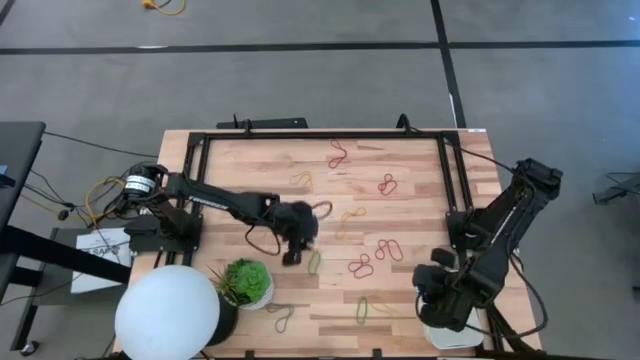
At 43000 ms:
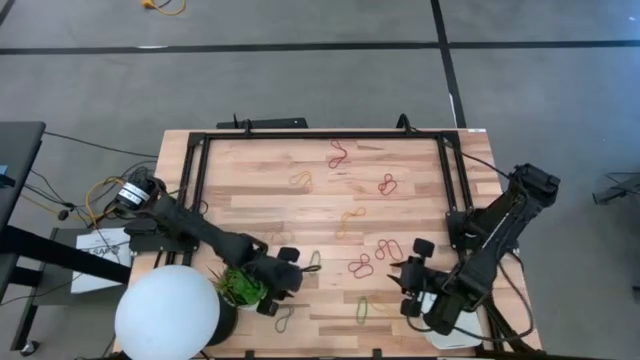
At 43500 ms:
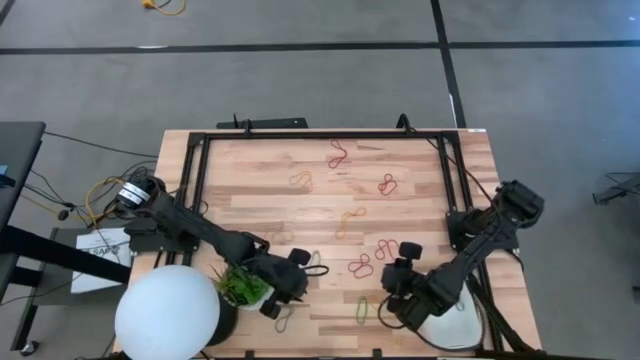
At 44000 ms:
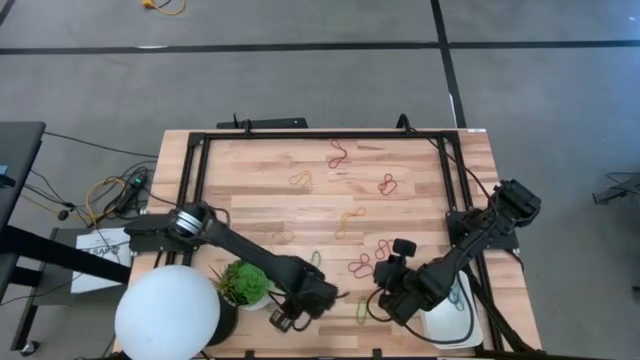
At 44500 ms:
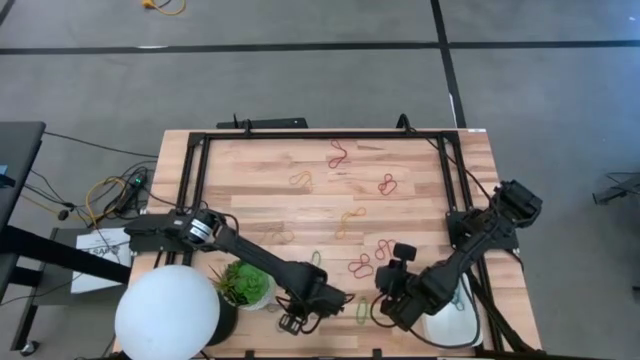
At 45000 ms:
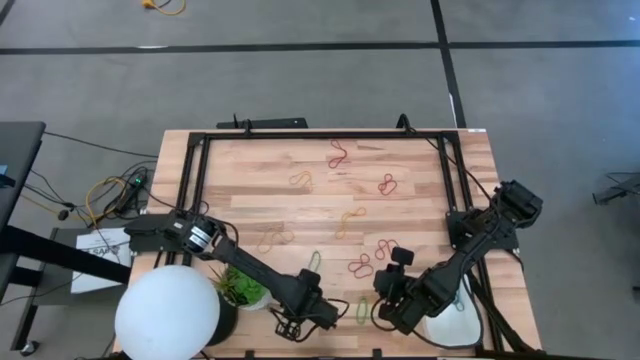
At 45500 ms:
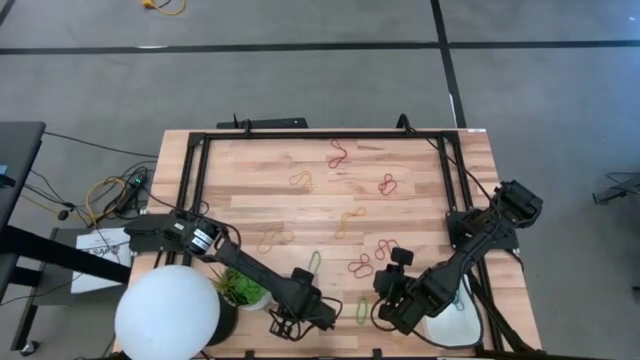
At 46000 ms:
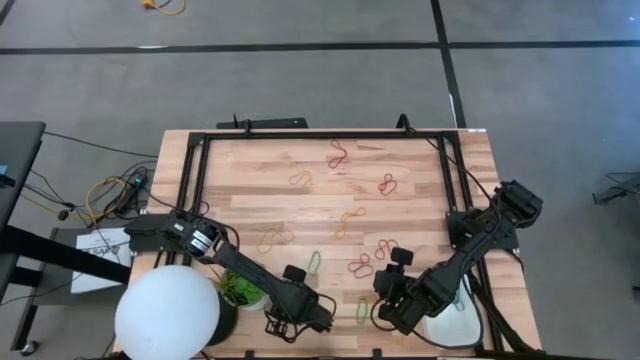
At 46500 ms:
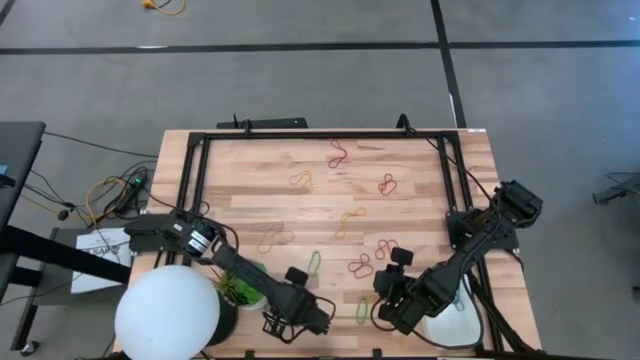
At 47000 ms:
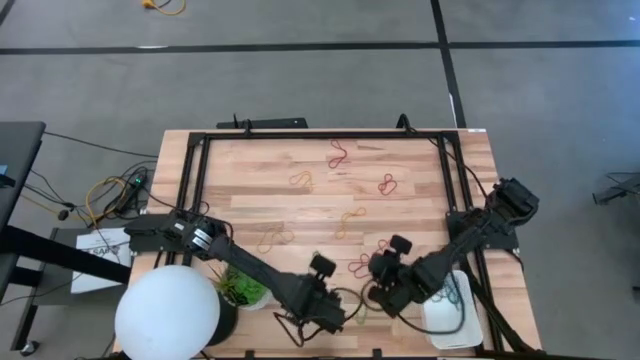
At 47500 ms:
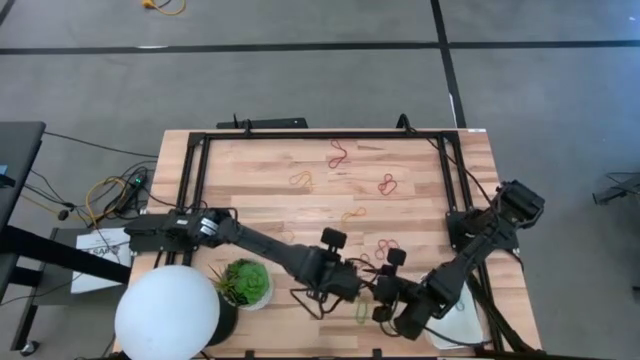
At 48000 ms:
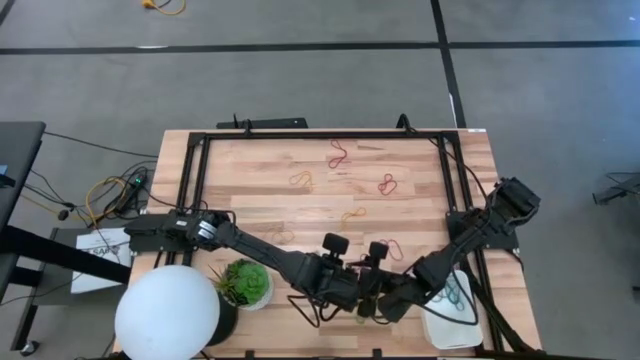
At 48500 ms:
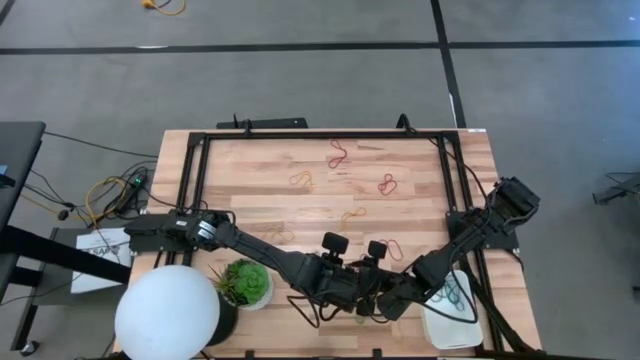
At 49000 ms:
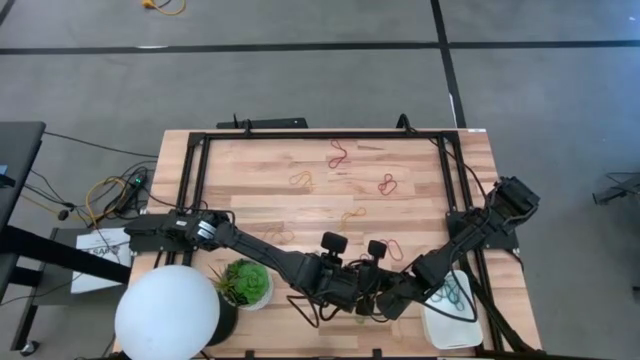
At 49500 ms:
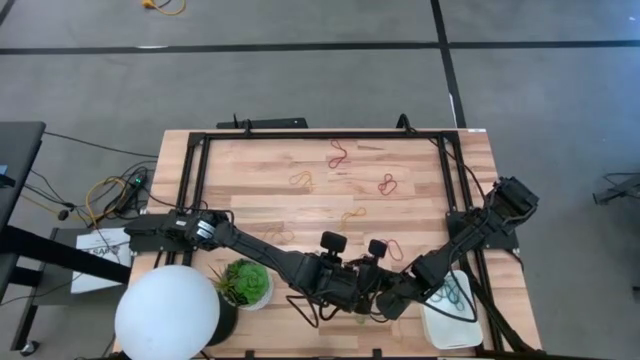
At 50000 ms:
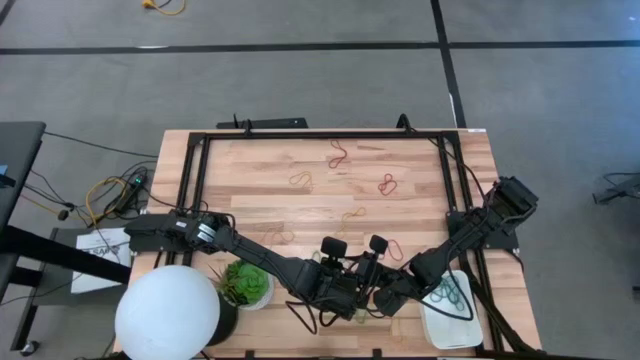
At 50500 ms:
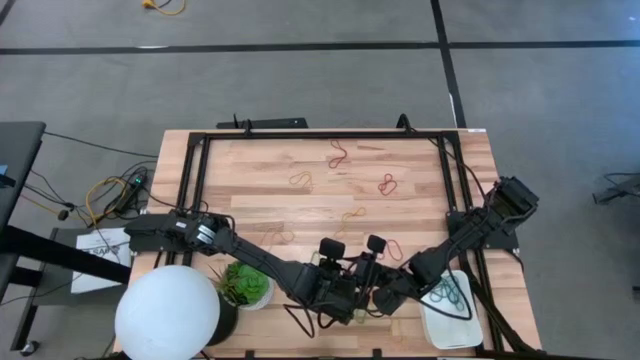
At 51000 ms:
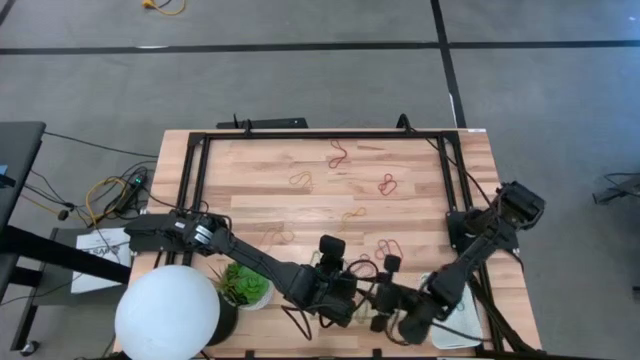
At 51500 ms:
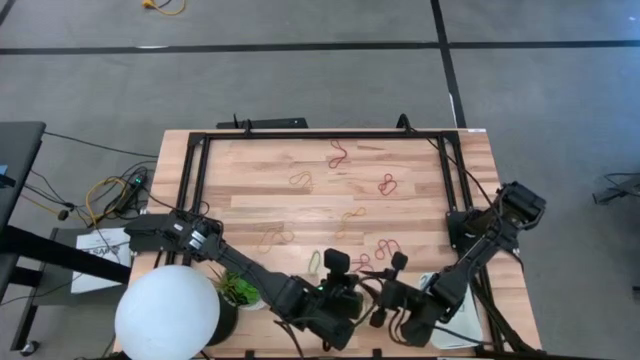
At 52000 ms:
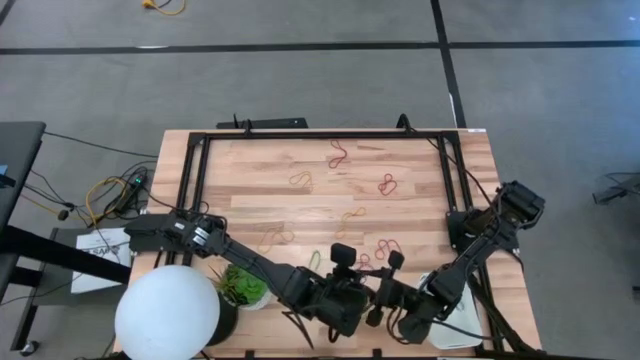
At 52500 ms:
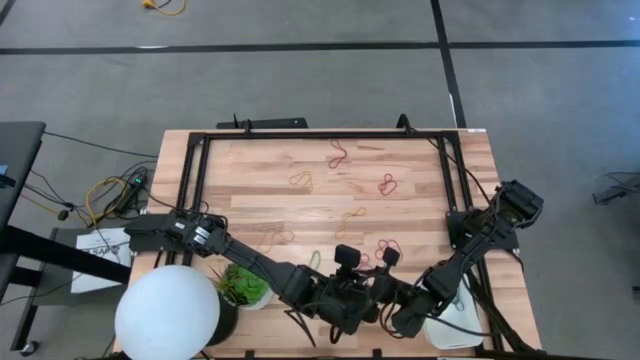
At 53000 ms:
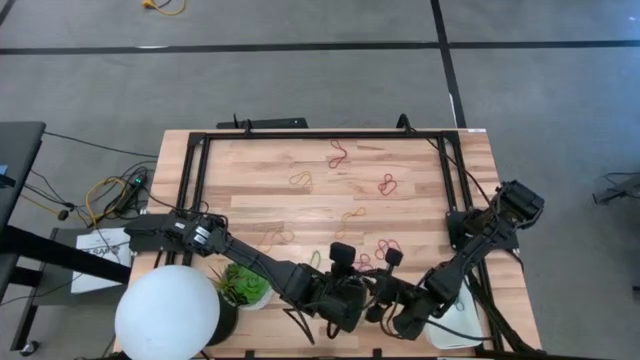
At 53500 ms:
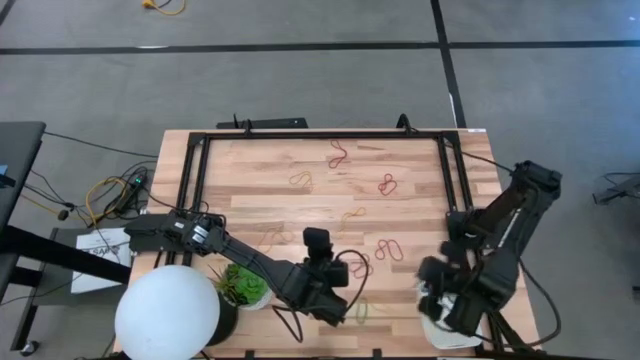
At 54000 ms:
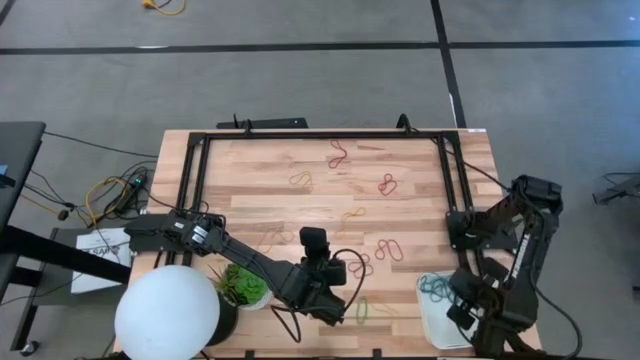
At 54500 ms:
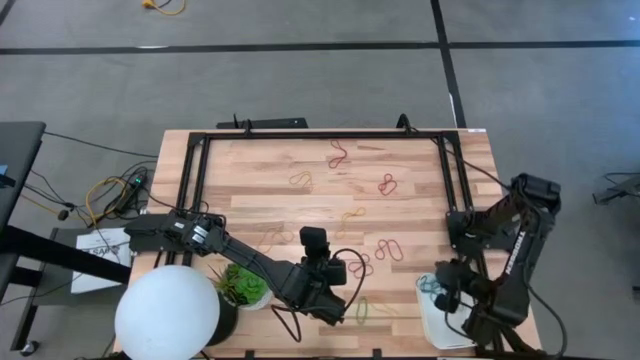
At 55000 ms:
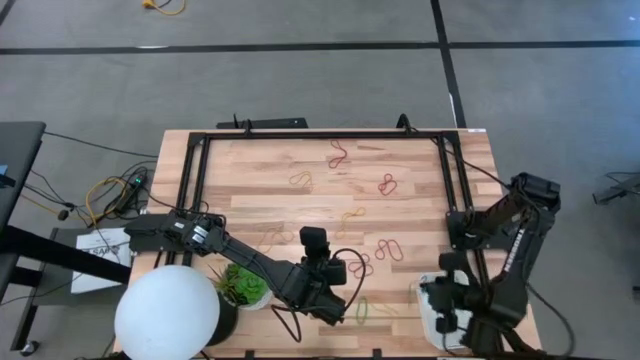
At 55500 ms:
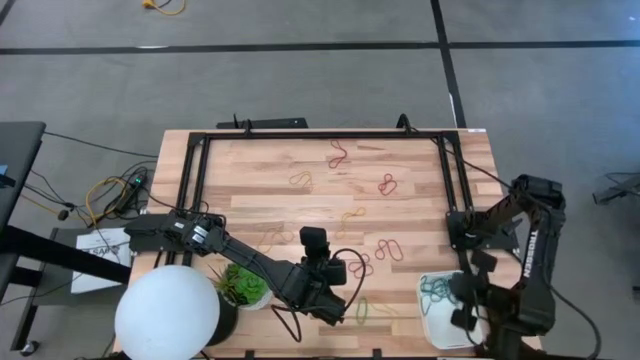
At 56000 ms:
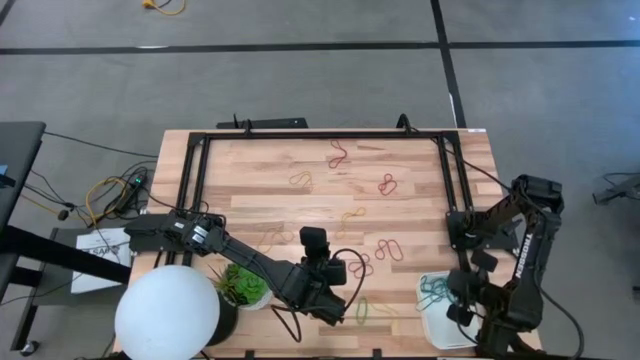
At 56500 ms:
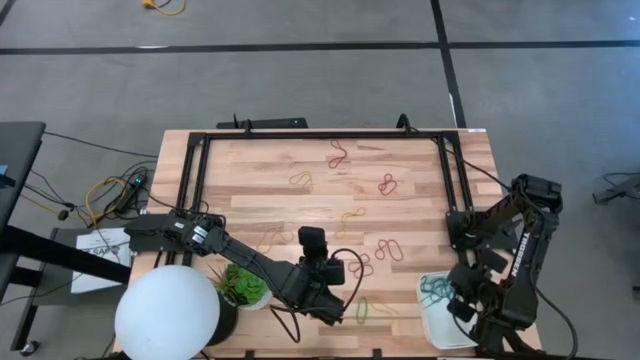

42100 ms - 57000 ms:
Task: Pick and place items into bin
Put the blue rubber band into the white bin

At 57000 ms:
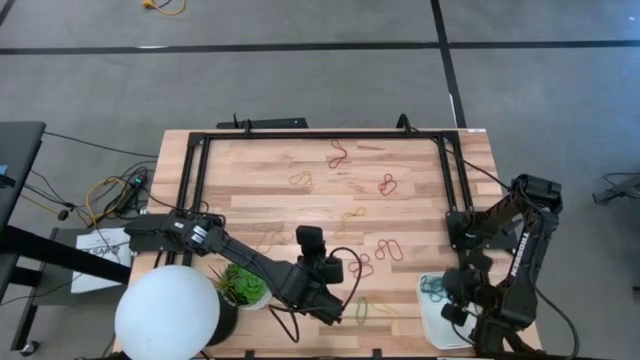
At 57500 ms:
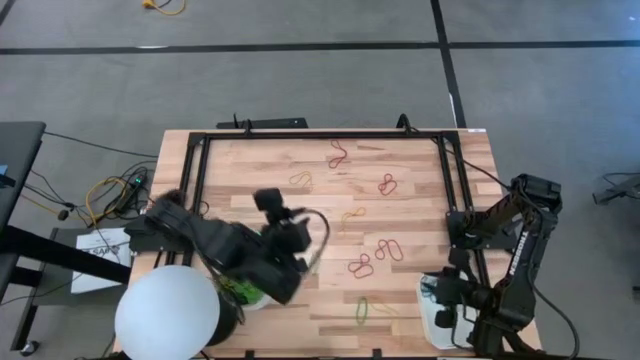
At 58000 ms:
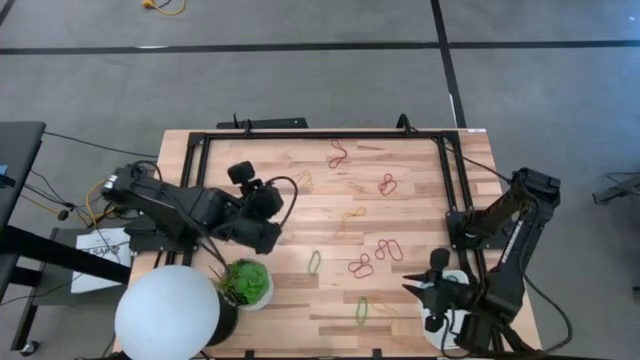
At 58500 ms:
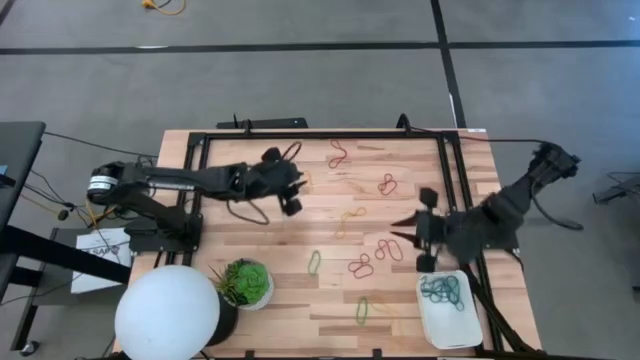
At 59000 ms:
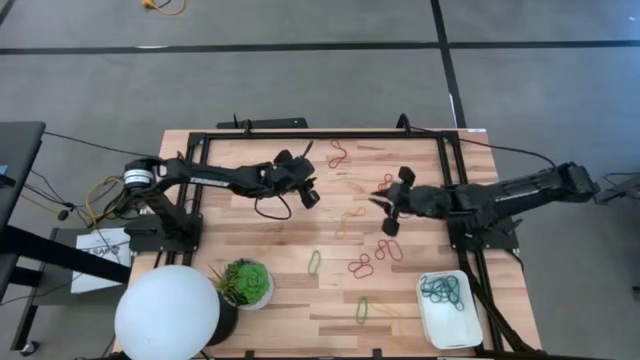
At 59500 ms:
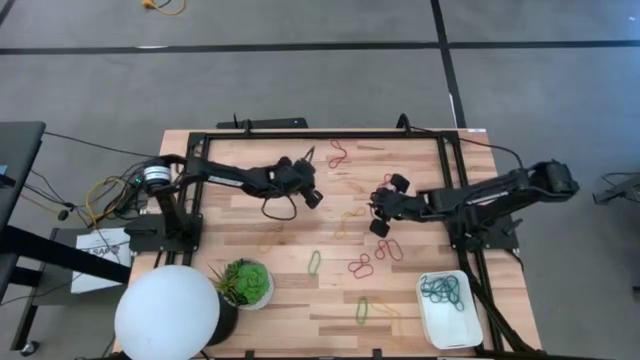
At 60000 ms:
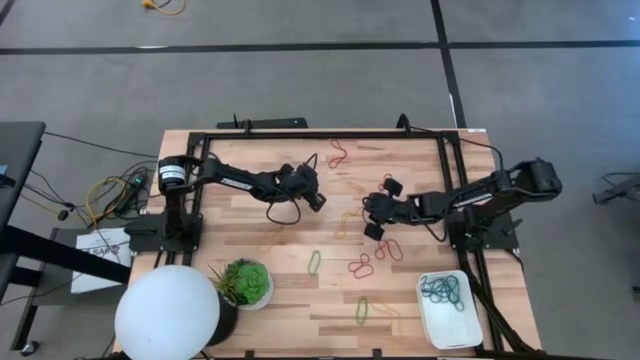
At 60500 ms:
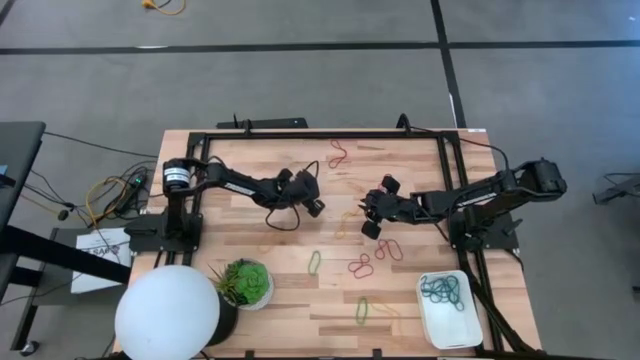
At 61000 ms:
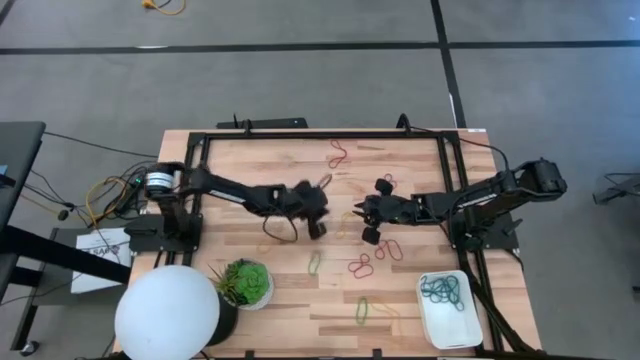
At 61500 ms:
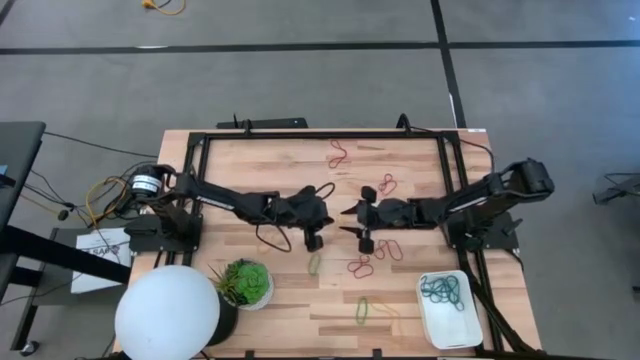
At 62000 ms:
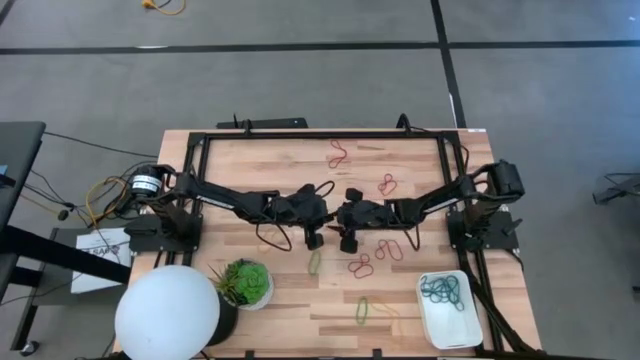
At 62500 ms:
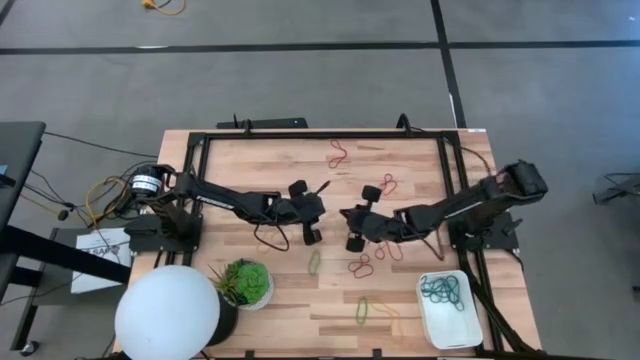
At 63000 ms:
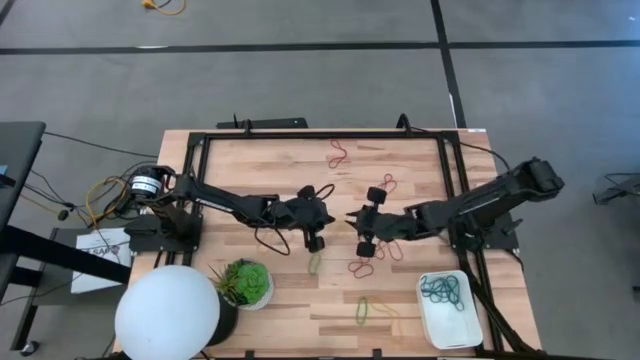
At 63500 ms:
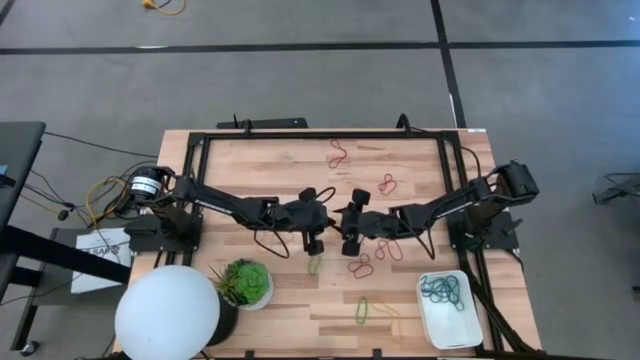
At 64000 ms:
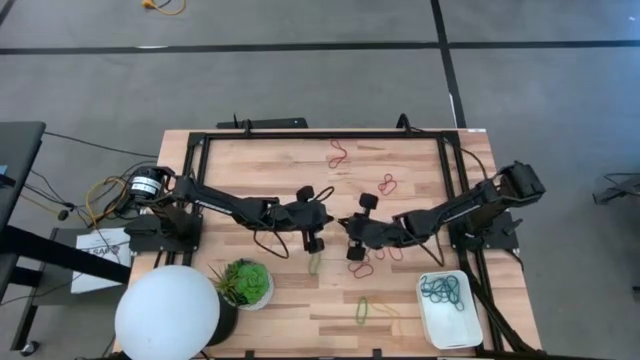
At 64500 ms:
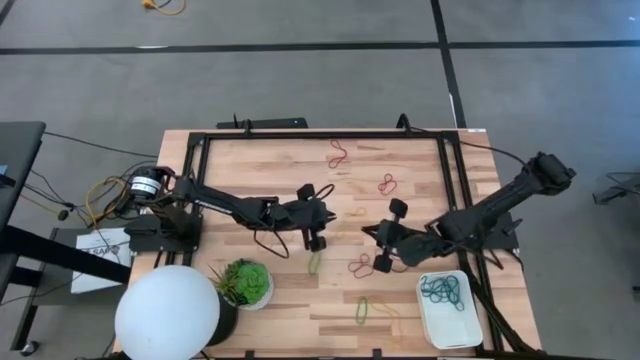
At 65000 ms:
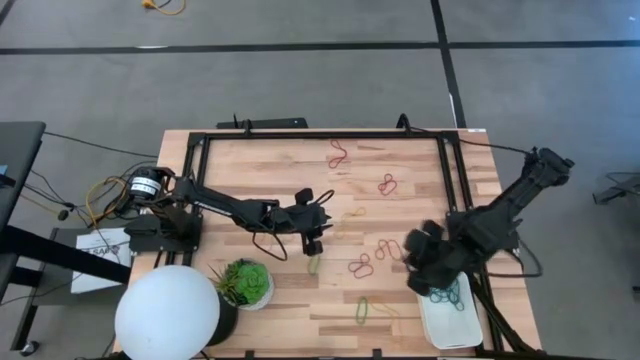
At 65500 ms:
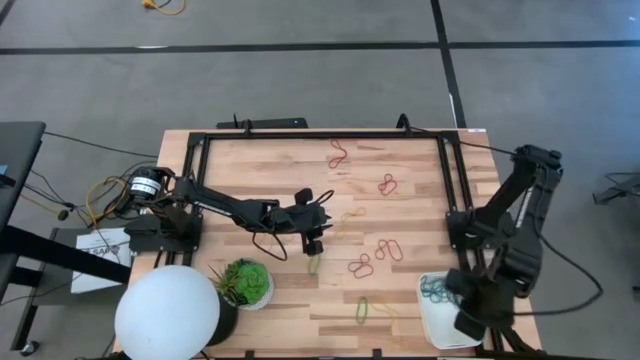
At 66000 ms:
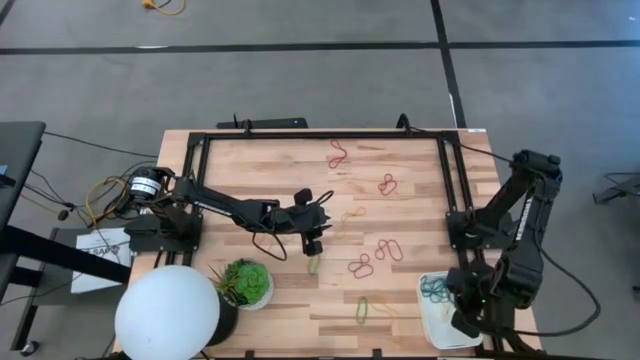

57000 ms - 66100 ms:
Put the yellow rubber band into the white bin
